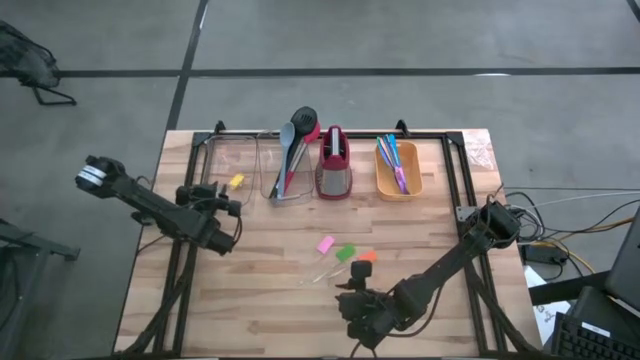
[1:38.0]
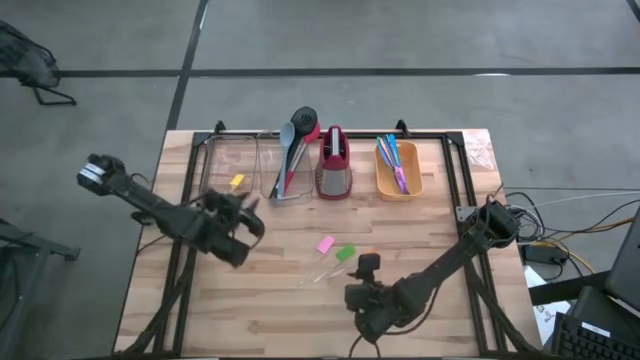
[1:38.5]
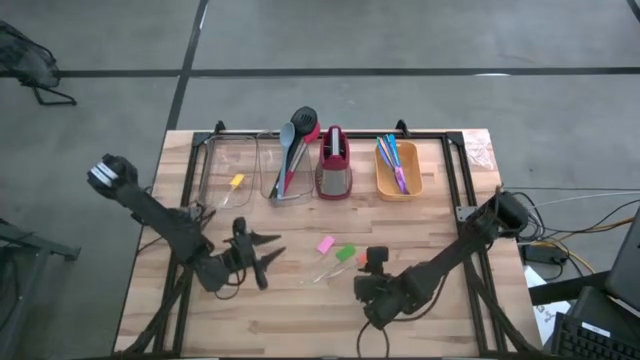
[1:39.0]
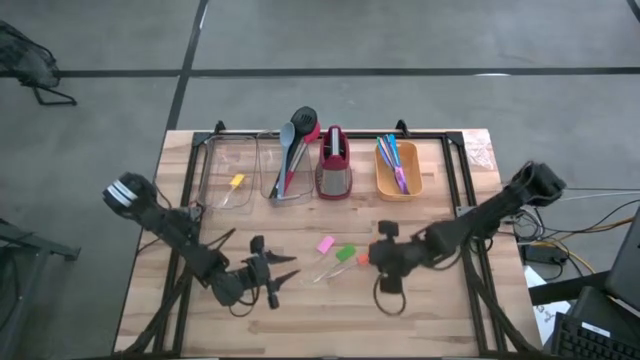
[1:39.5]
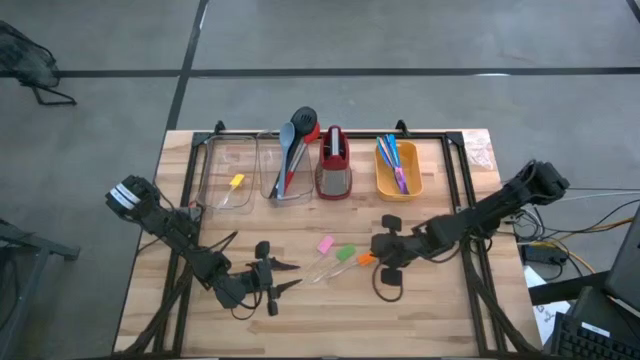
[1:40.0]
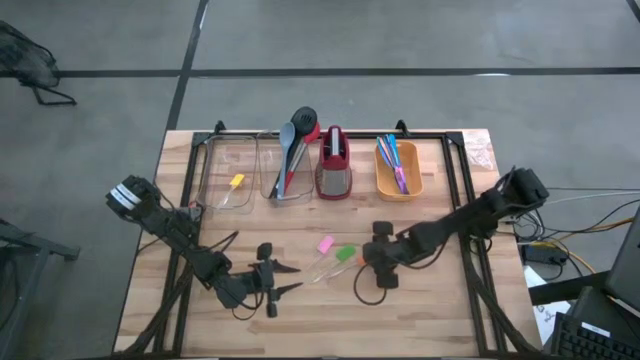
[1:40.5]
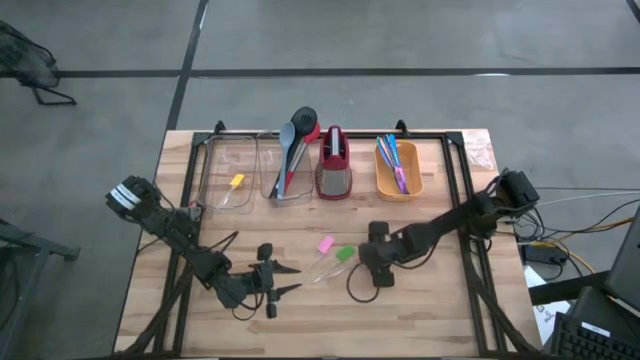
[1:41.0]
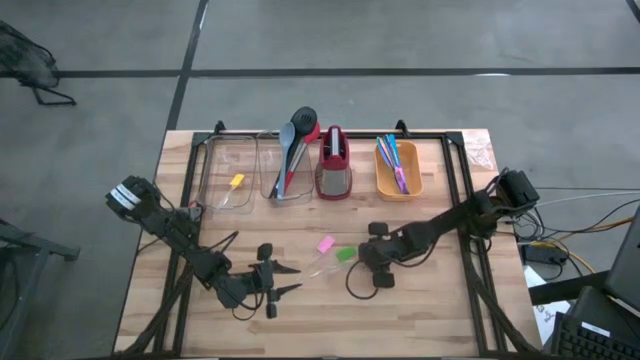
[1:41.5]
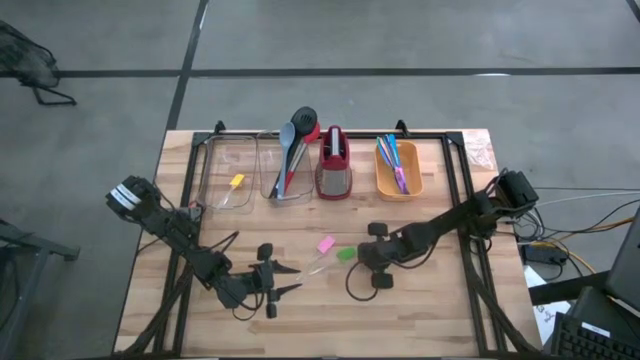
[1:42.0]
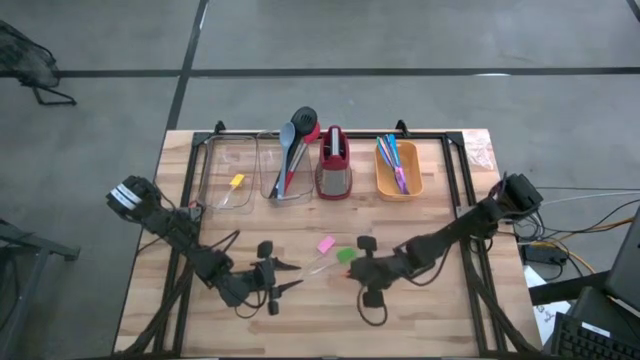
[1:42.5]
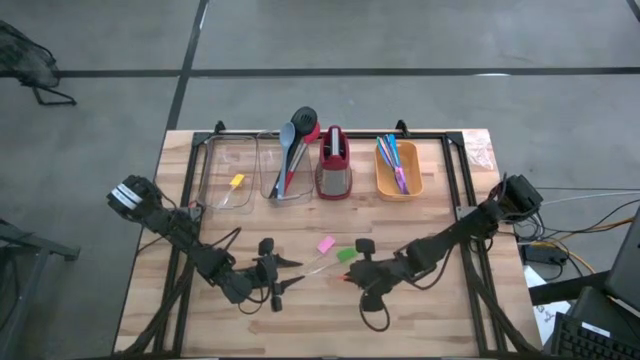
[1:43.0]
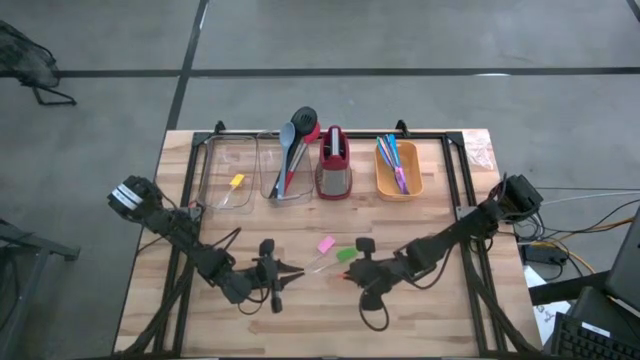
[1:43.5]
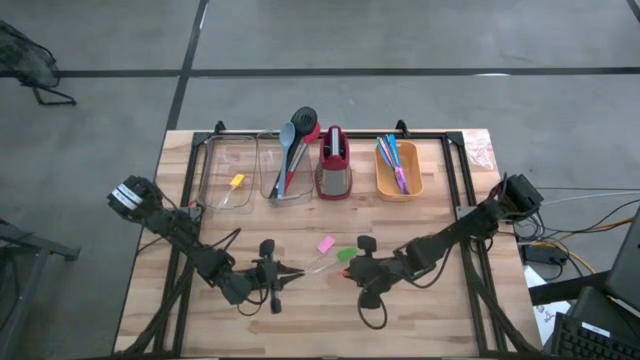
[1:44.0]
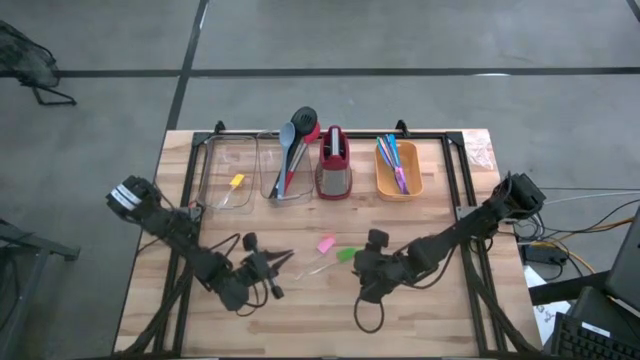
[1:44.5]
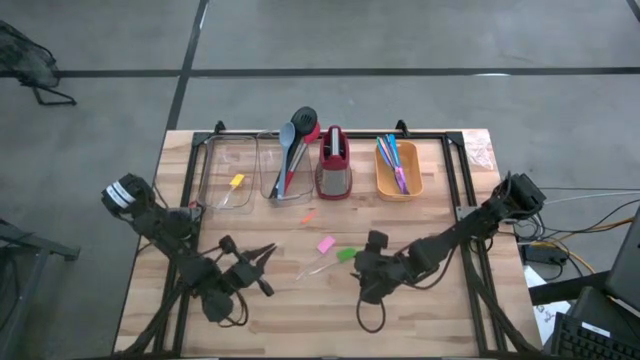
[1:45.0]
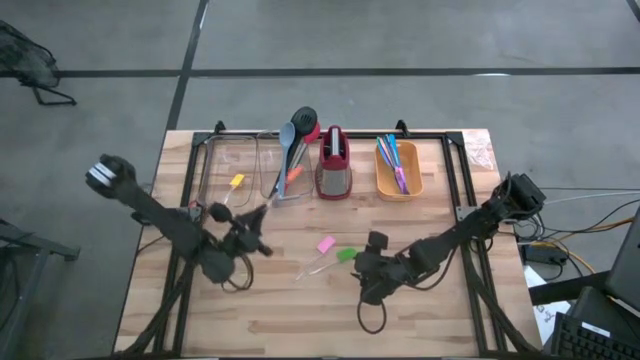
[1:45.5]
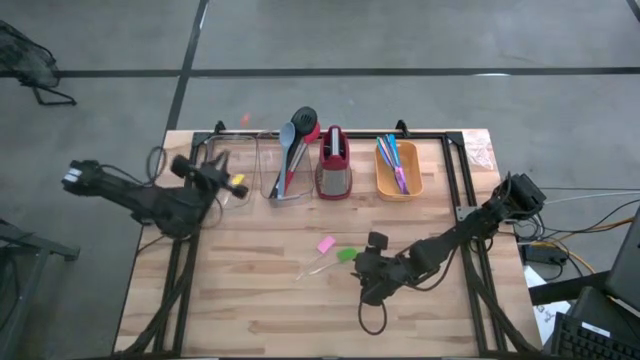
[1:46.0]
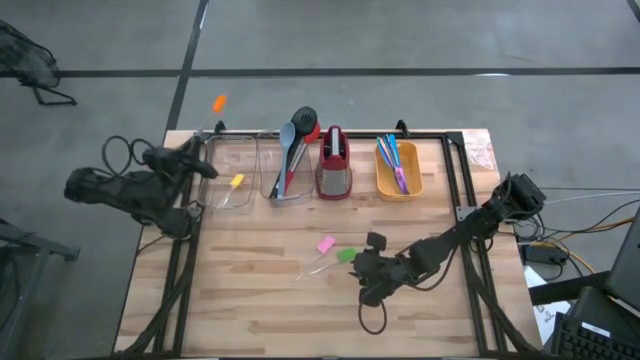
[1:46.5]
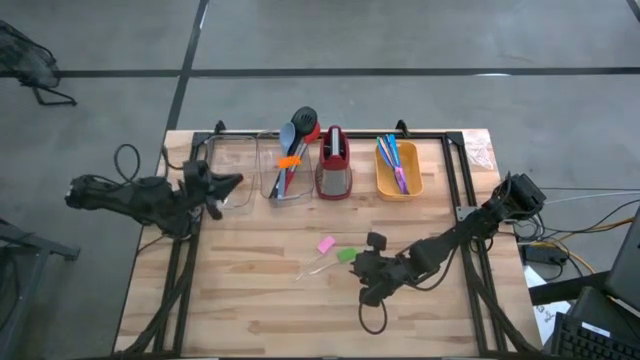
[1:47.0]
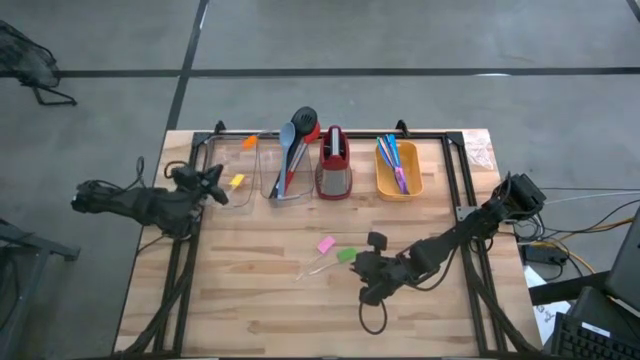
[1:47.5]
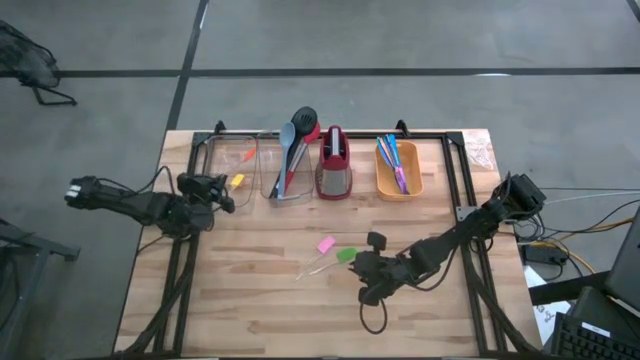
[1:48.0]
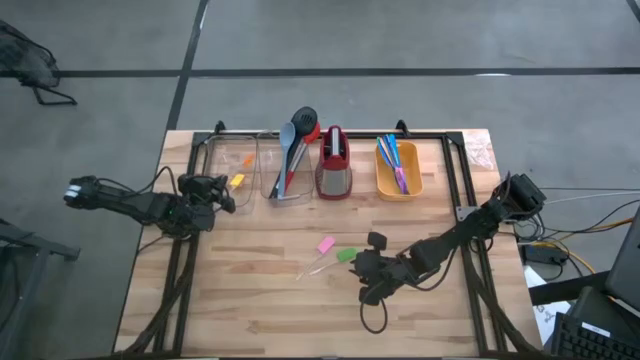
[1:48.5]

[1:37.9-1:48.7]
Task: Pick & Place Kitchen Items
Put the orange spatula into the left transparent bin

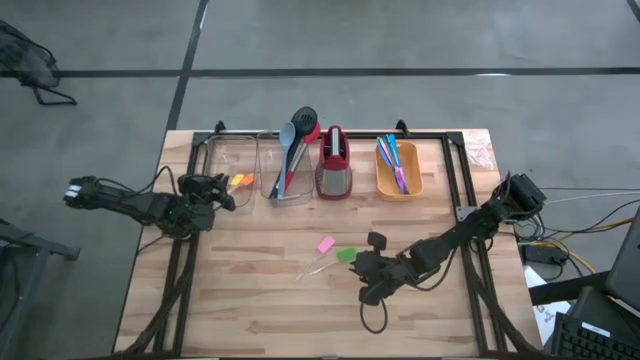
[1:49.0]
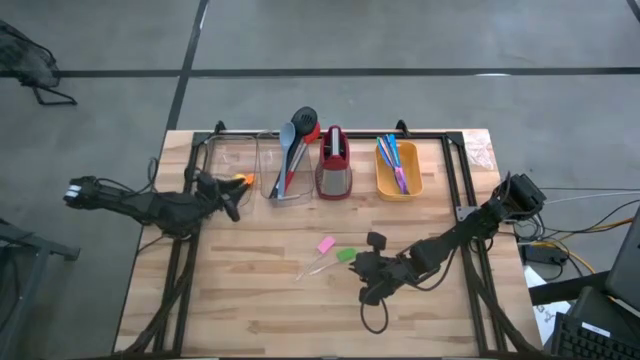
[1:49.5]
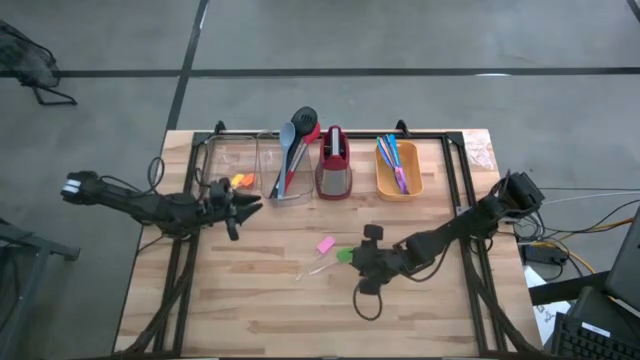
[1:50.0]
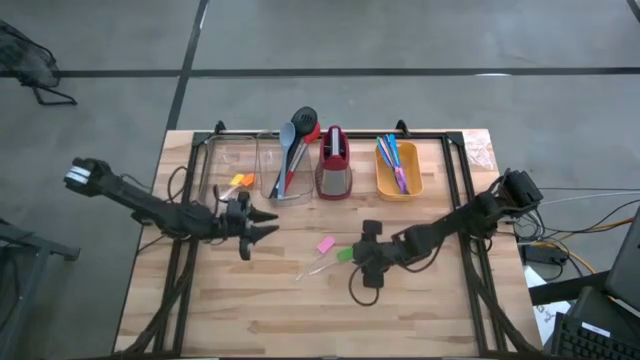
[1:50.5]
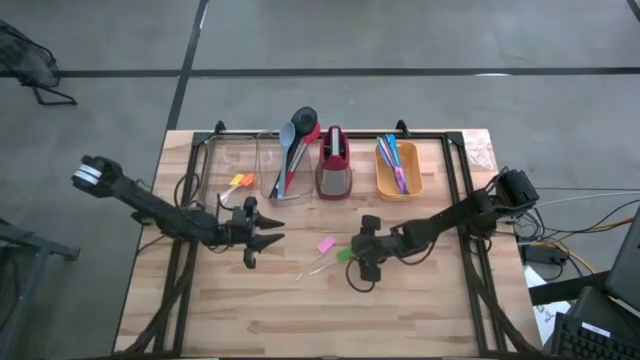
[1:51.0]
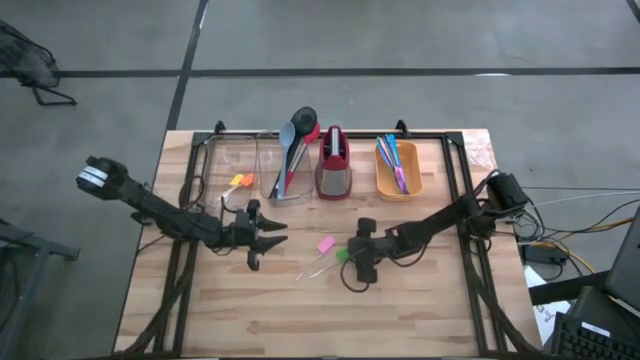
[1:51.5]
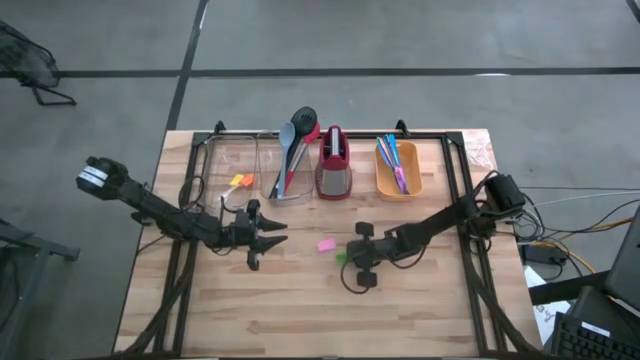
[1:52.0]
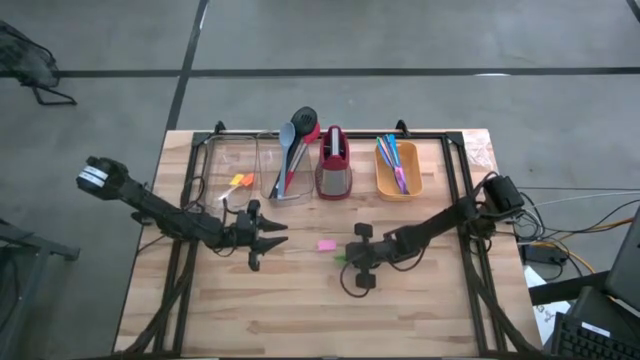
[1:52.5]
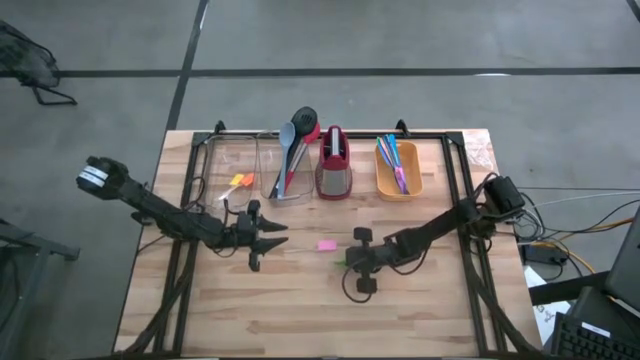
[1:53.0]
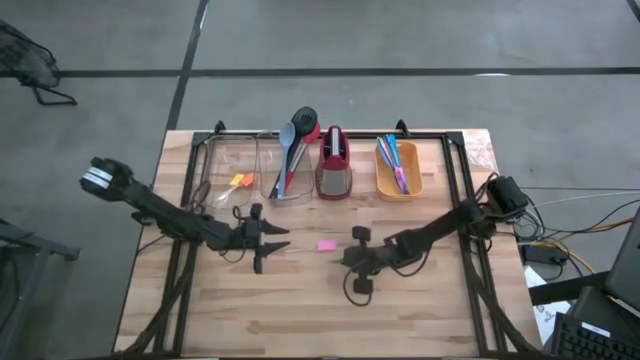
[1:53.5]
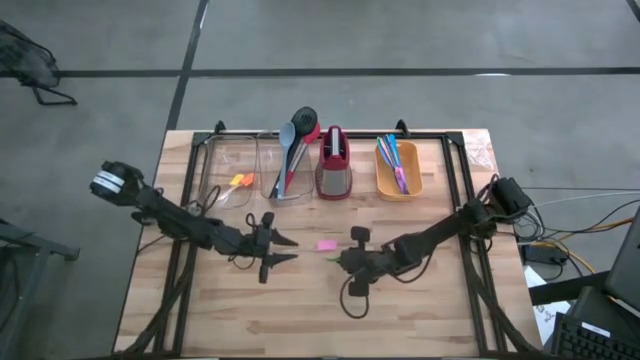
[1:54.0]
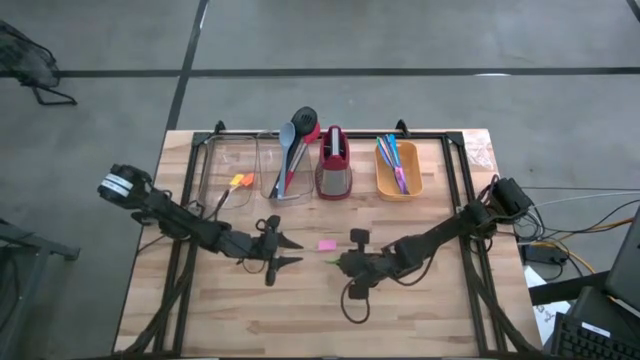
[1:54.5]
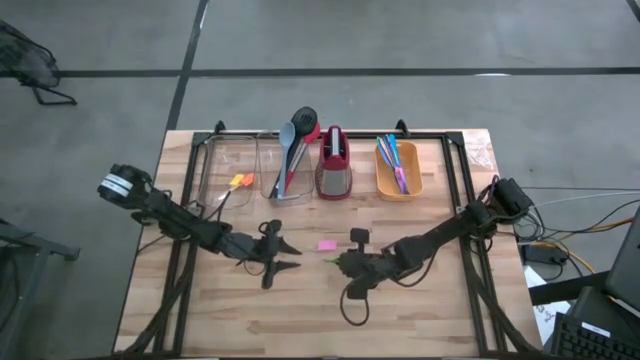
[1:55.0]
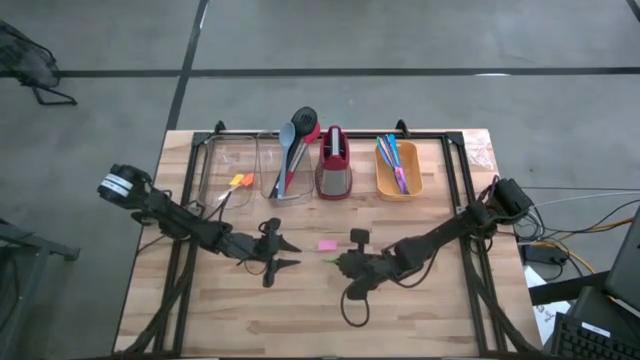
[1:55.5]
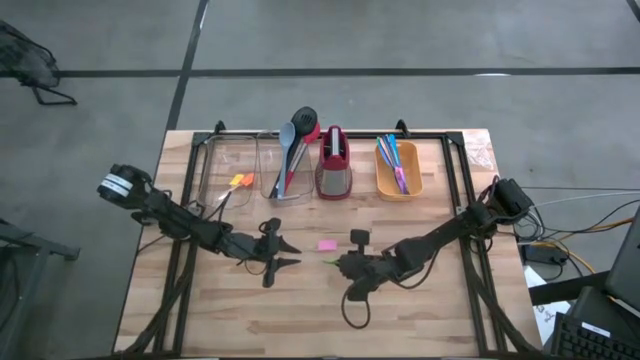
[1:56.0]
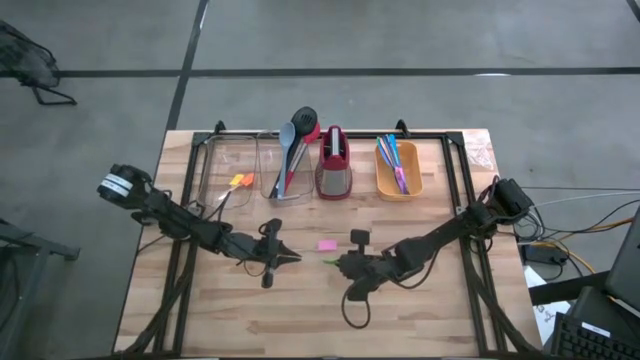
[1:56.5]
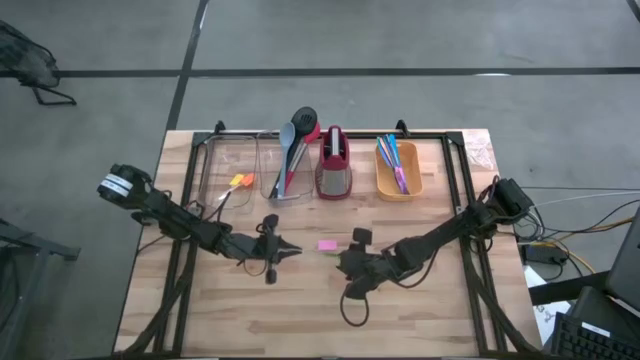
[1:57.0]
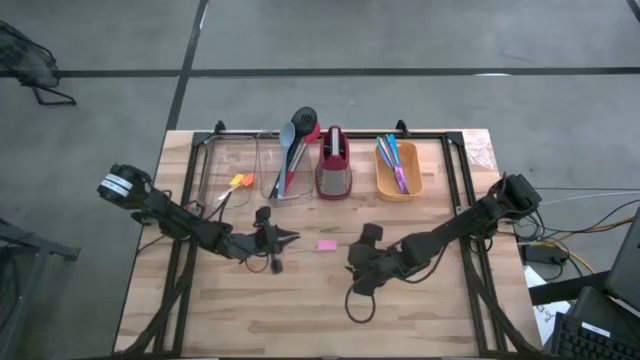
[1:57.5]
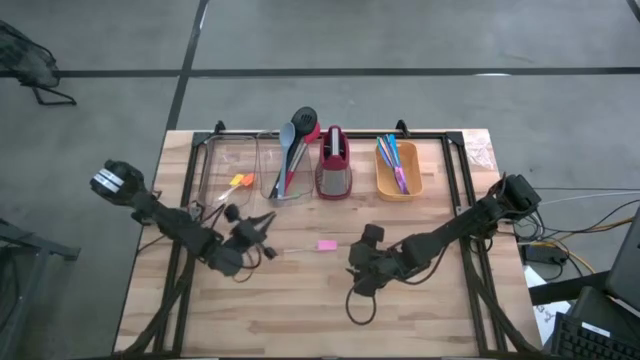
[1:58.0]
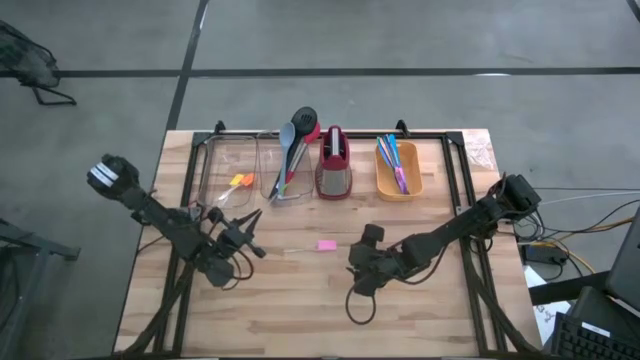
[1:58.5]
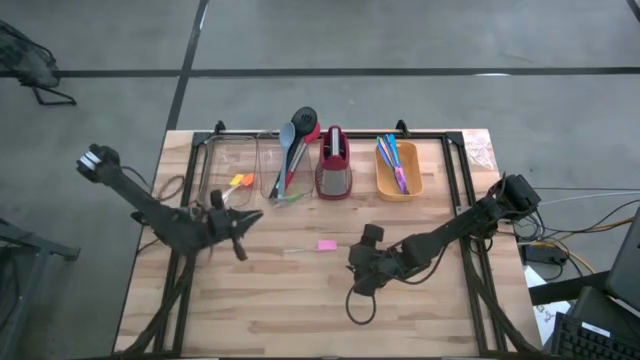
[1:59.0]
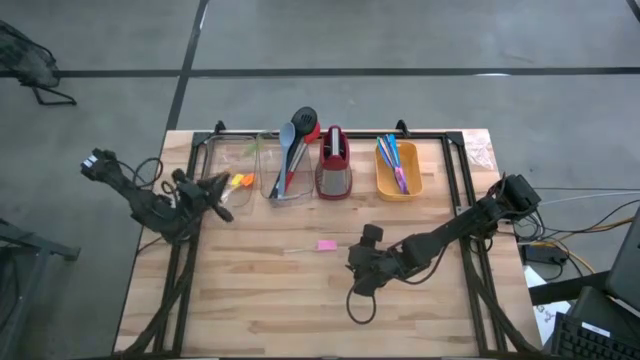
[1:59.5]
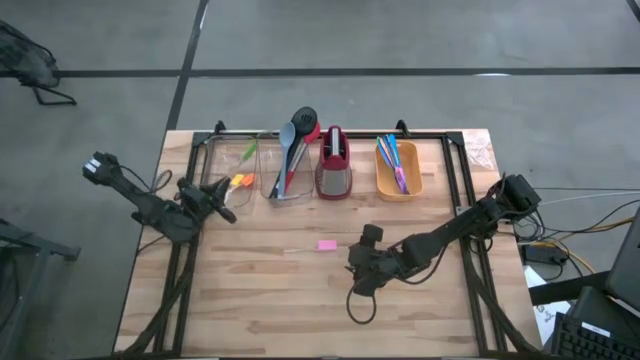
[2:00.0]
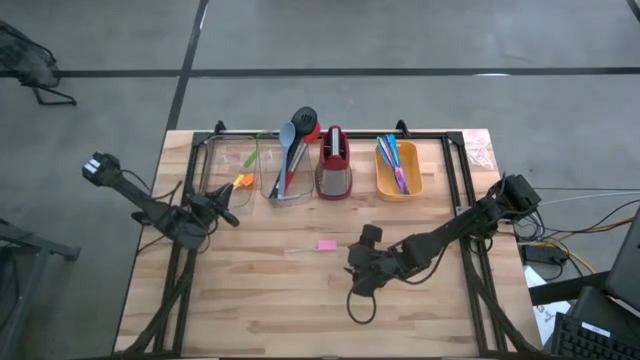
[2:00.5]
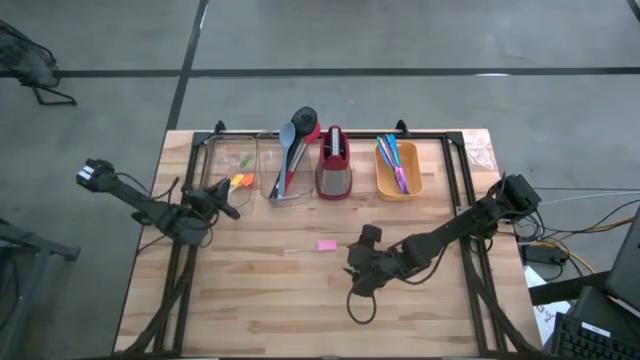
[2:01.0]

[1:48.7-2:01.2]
Put the green spatula into the left transparent bin
